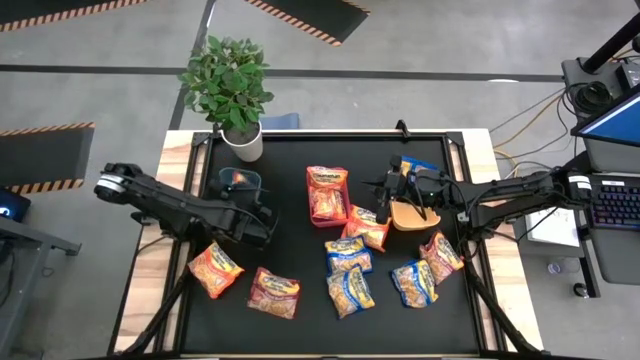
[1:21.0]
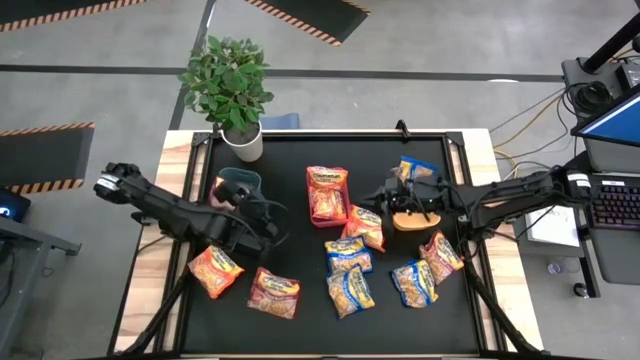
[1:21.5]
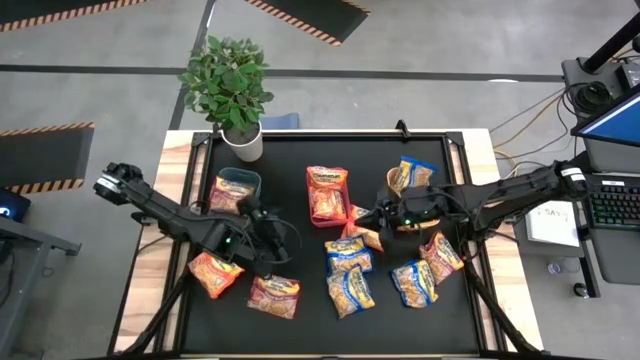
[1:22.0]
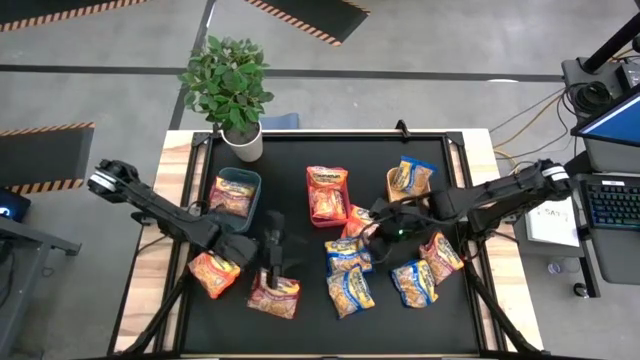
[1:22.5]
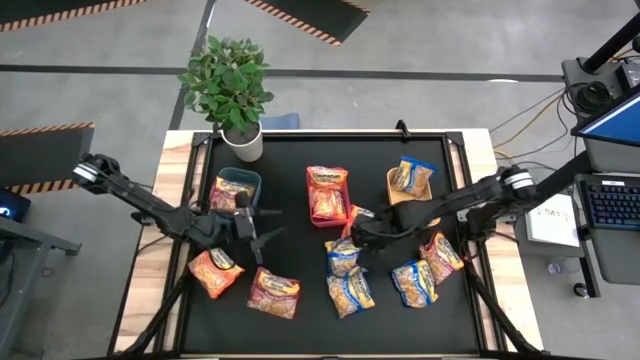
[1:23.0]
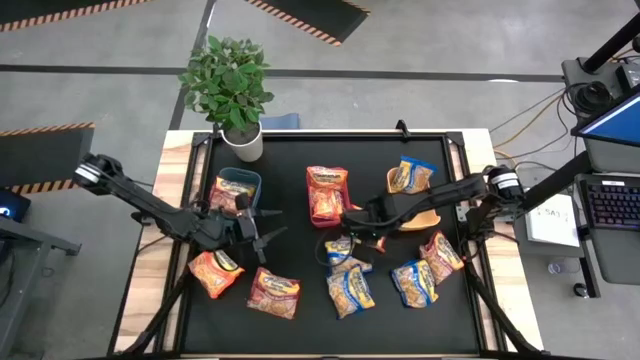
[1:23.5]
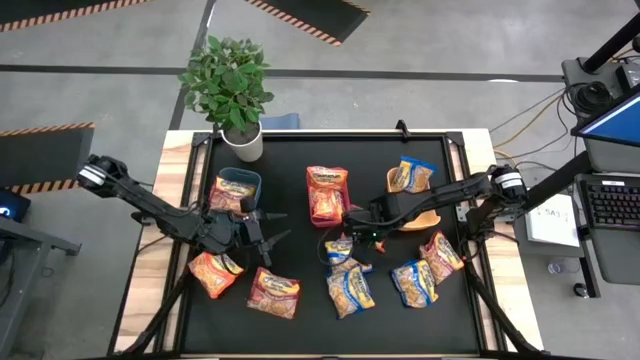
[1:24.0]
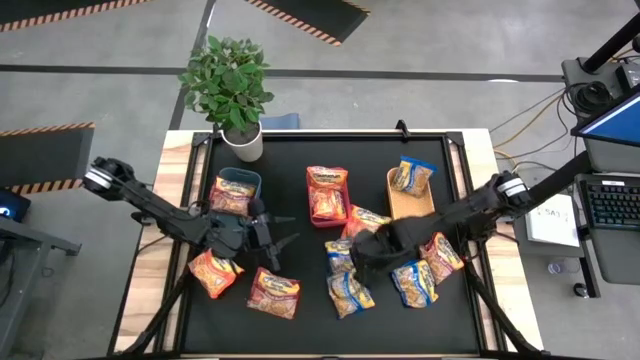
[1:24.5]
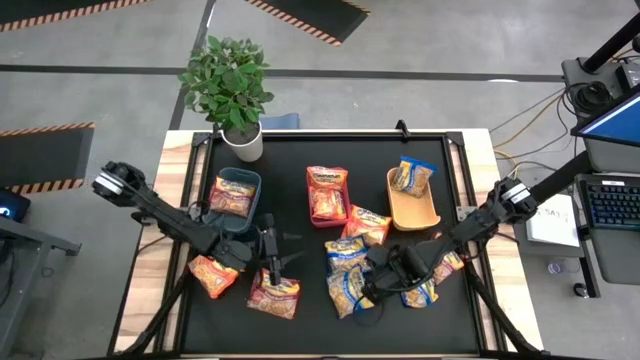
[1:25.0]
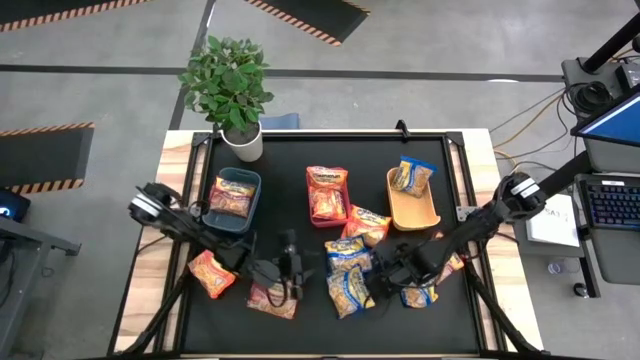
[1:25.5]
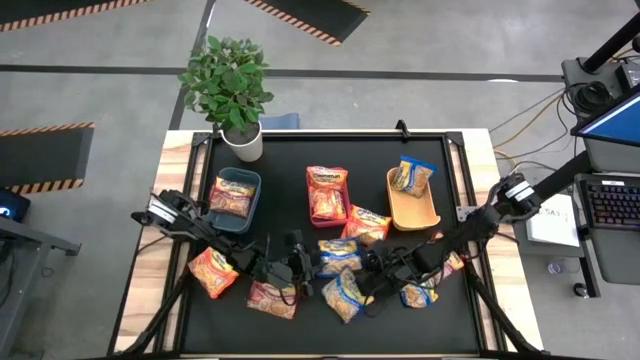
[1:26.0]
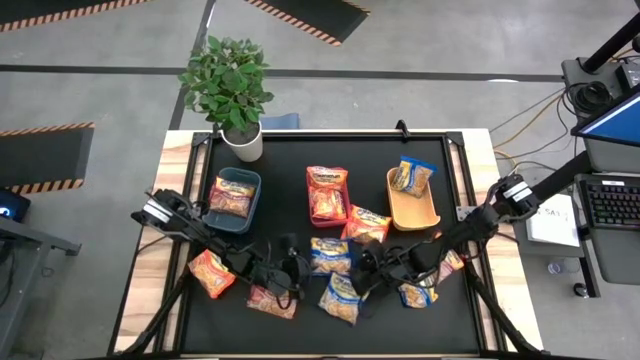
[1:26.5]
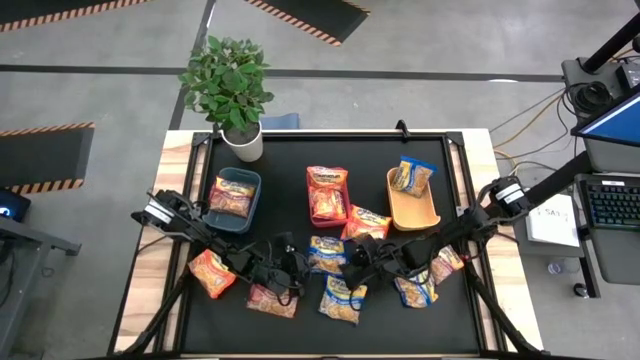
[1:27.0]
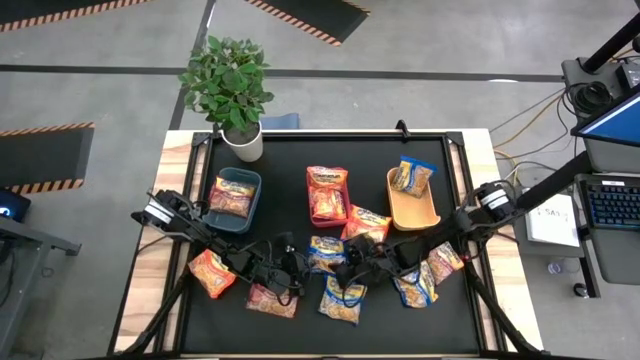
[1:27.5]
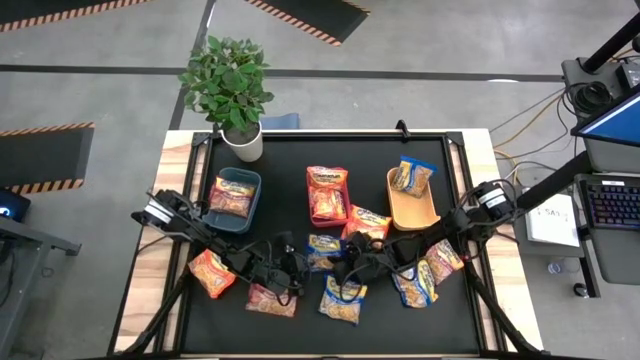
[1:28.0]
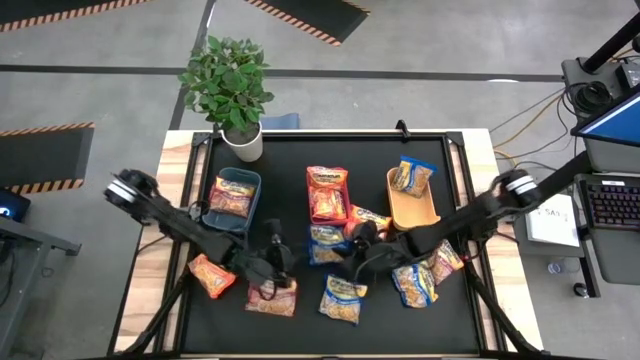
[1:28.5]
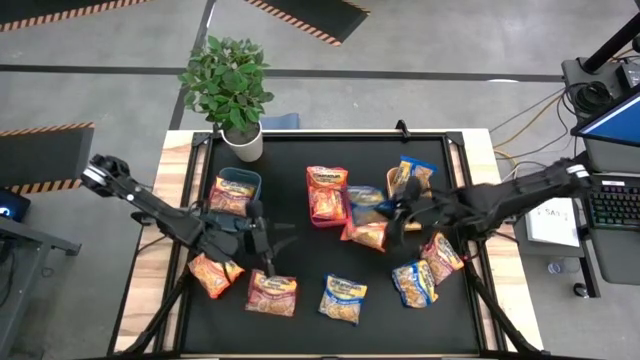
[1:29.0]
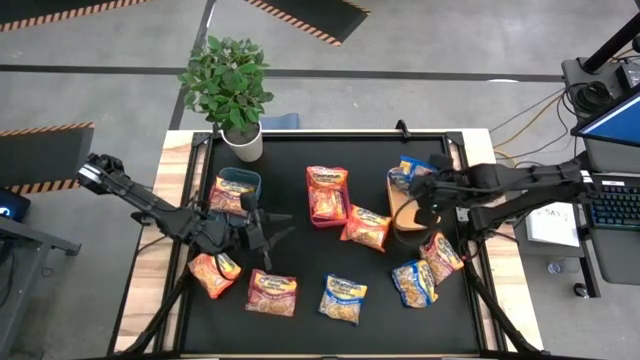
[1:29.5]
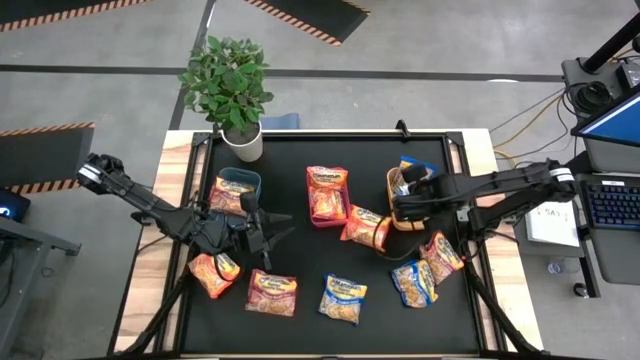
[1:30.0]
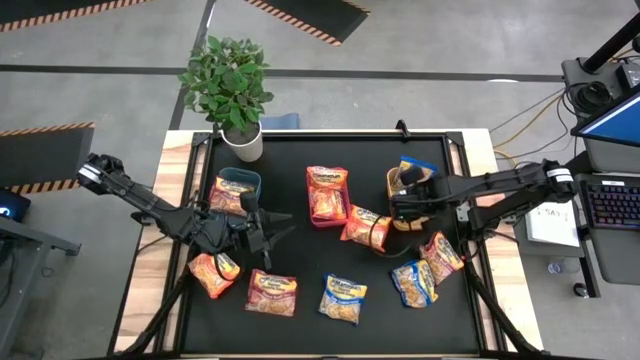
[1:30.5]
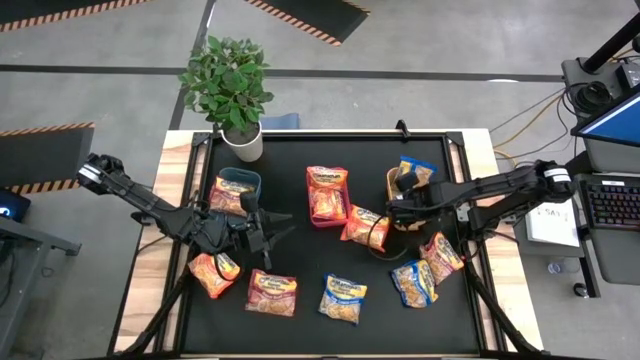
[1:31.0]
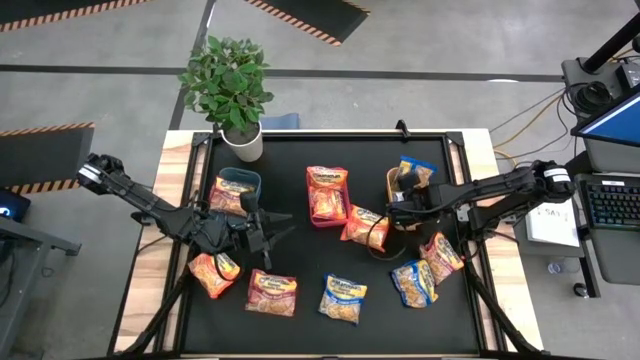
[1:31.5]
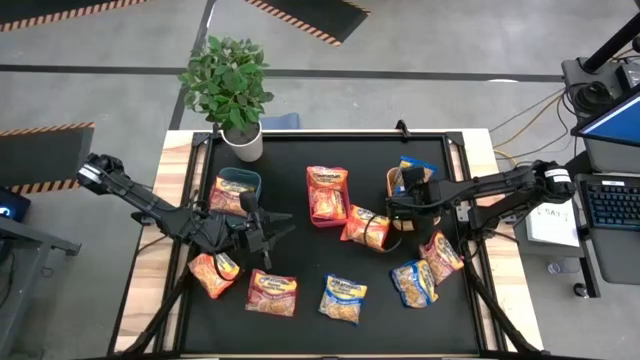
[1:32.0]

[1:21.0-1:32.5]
Task: Sort Maruchan noodles
Put the blue noodle pack into the yellow bin

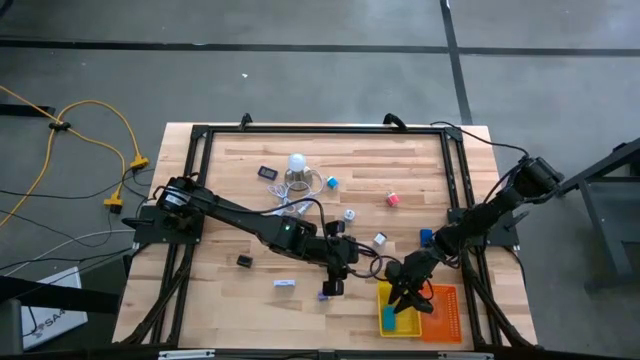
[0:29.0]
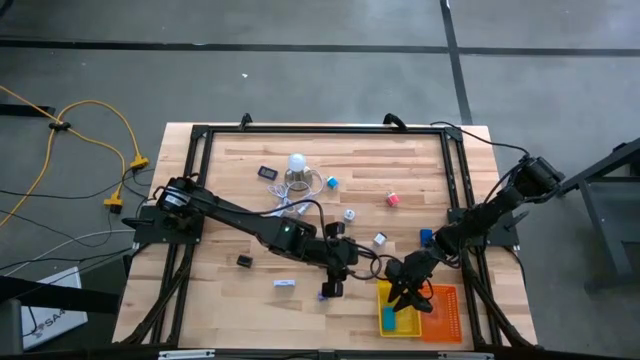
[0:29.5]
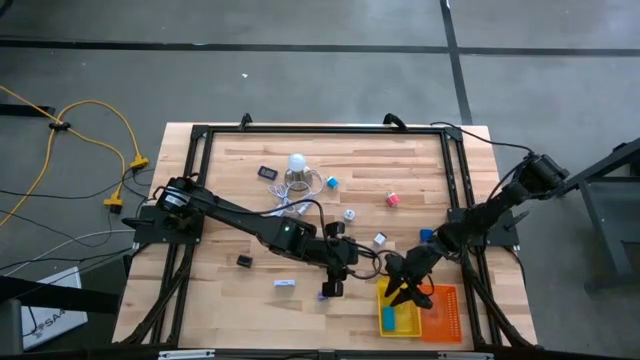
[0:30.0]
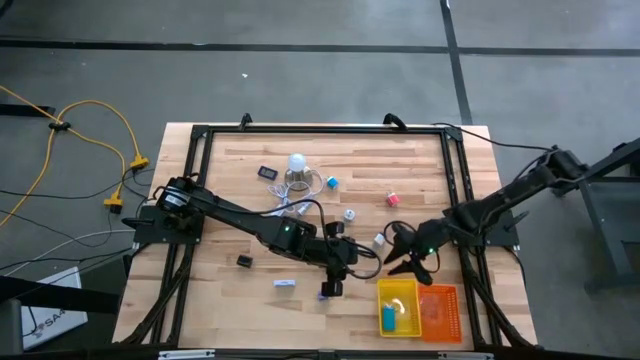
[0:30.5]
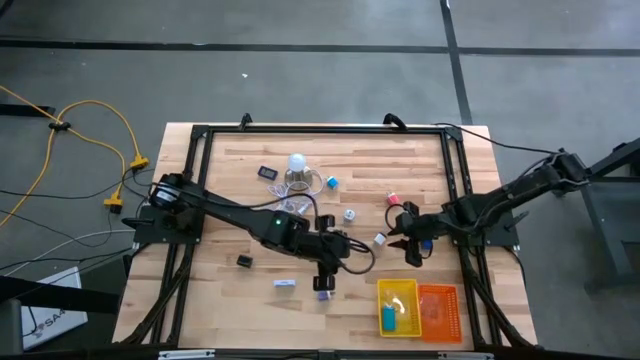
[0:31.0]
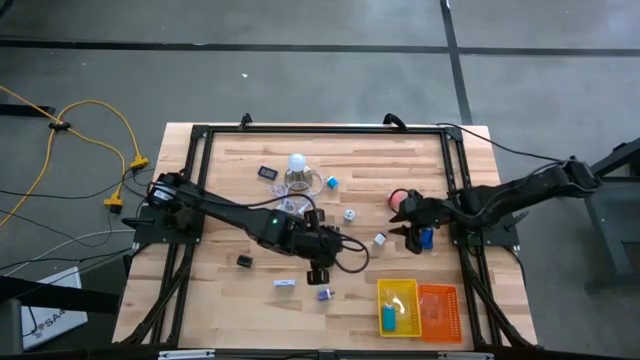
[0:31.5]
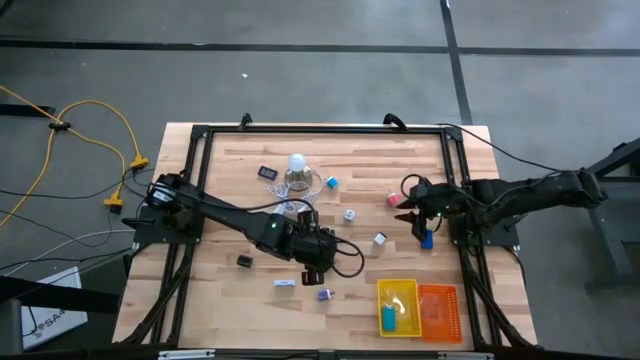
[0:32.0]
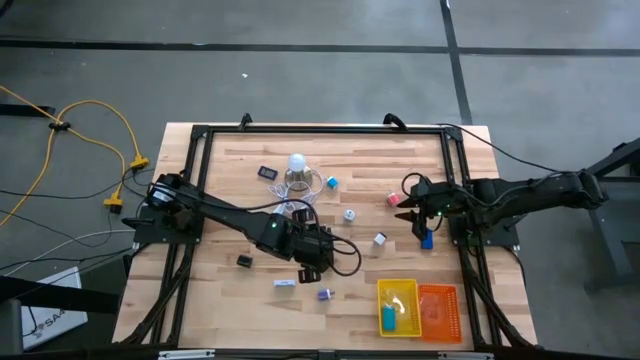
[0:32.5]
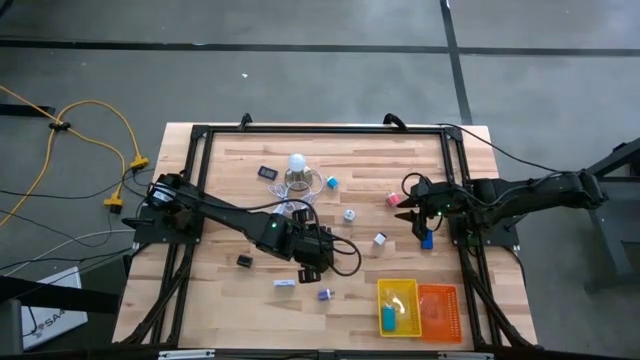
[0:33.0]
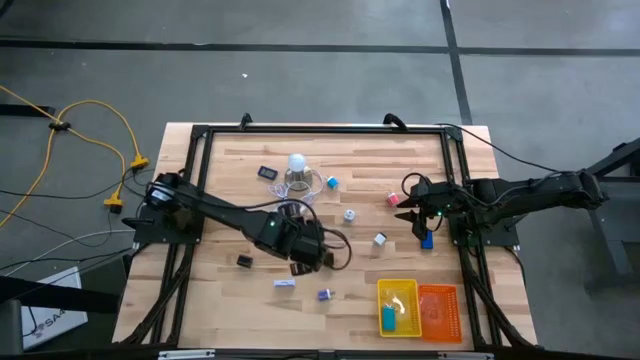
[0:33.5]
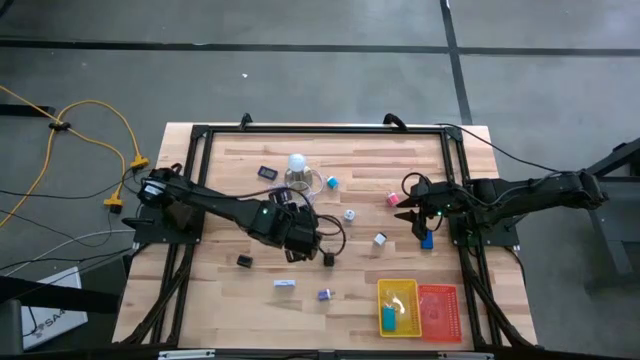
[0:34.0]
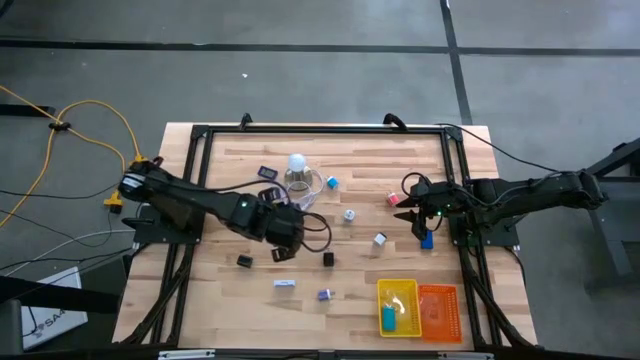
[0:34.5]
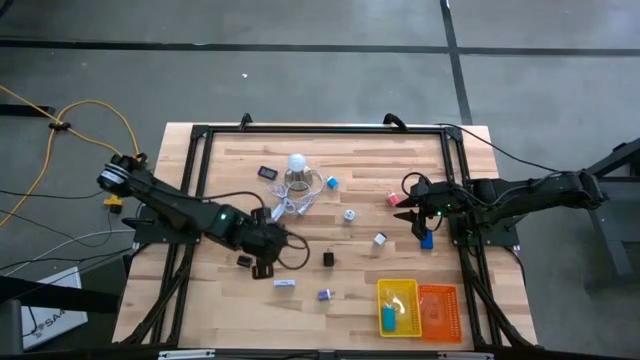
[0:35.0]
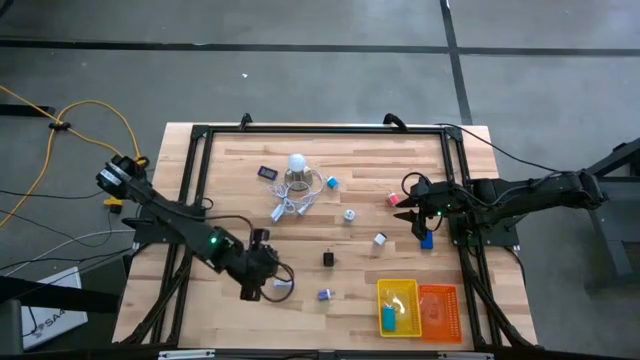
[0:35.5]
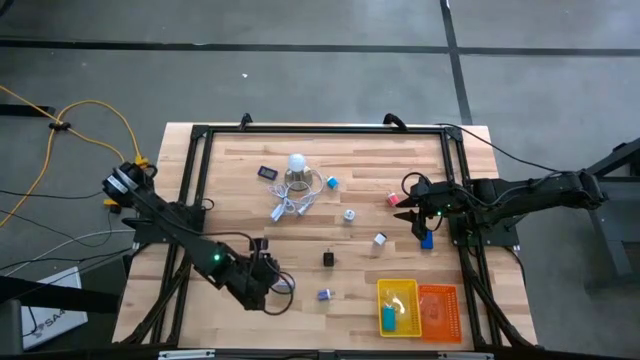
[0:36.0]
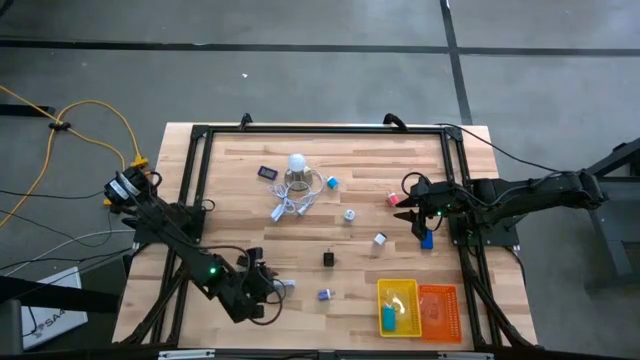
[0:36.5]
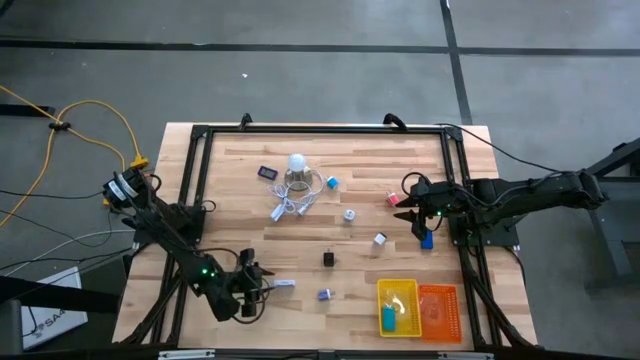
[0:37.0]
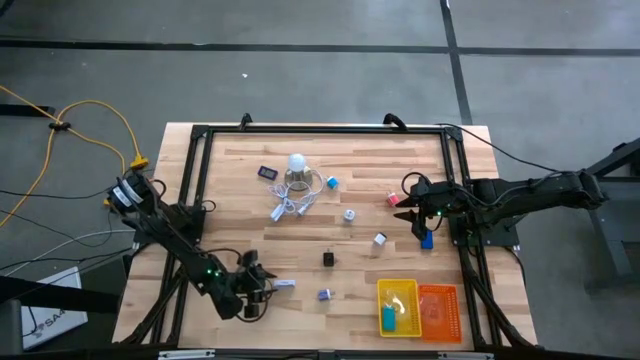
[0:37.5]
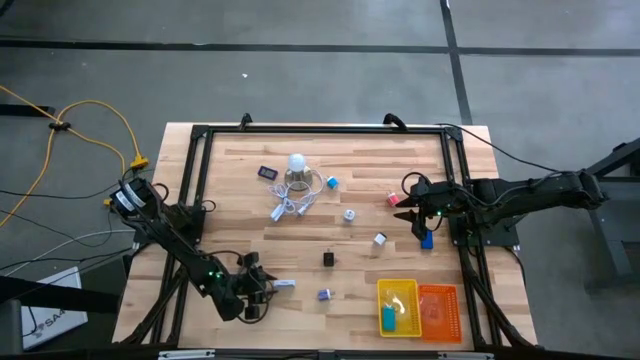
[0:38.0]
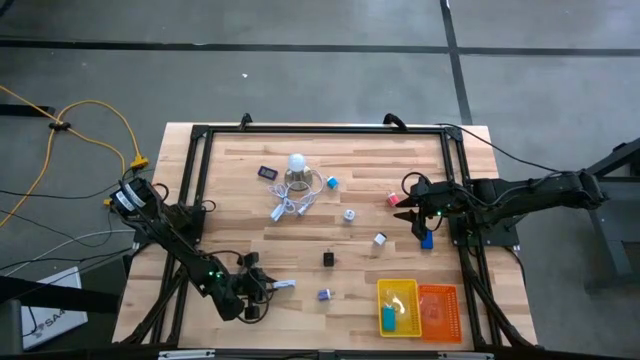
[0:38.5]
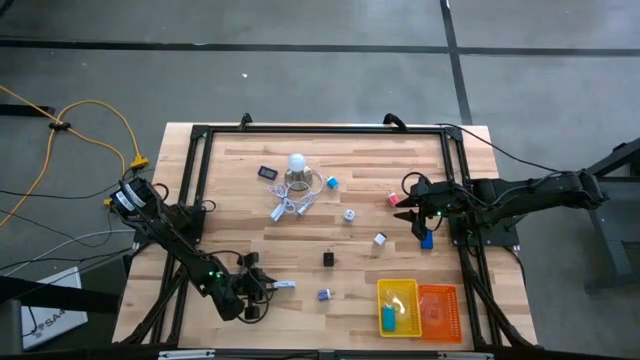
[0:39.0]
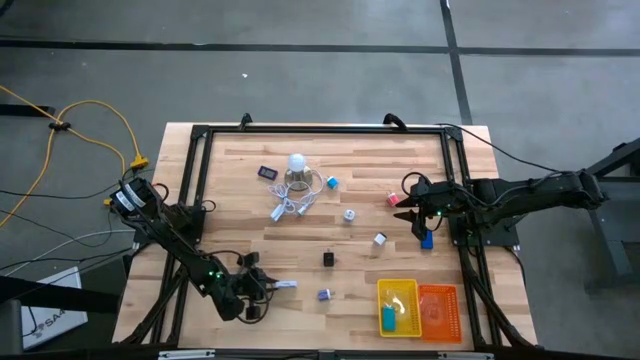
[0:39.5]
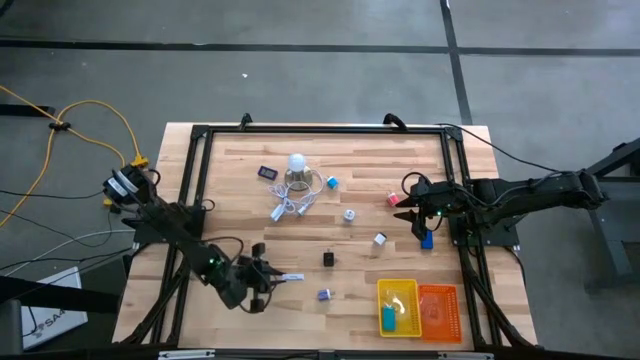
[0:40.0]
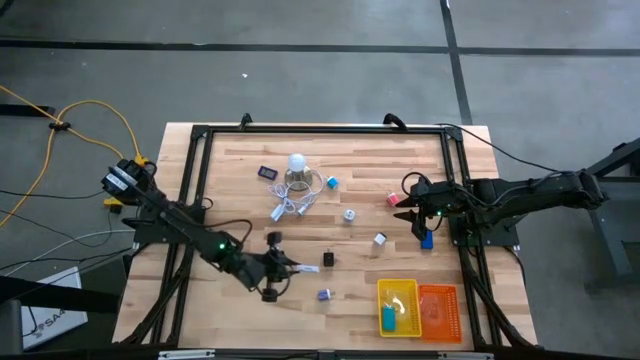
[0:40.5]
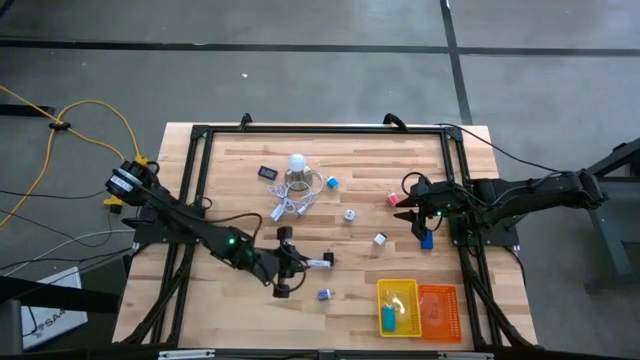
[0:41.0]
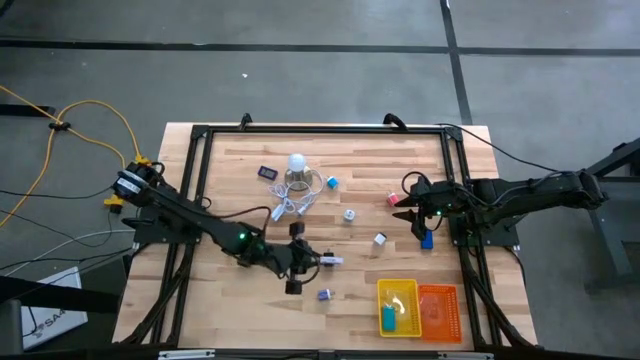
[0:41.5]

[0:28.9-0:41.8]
Task: Pick & Place Office items
Put the white digital clock into the yellow basket
